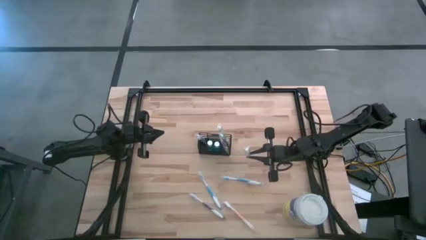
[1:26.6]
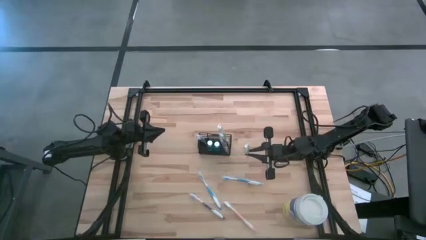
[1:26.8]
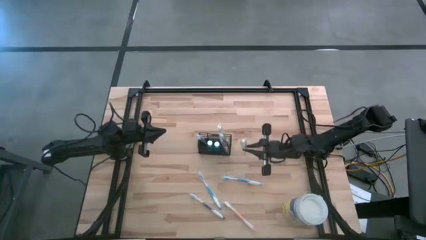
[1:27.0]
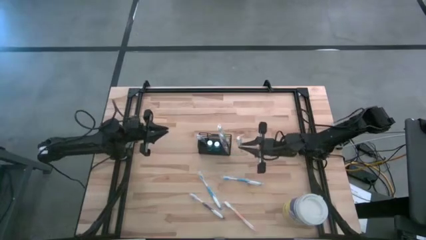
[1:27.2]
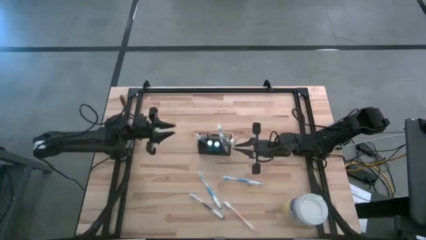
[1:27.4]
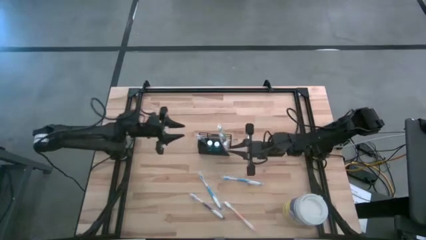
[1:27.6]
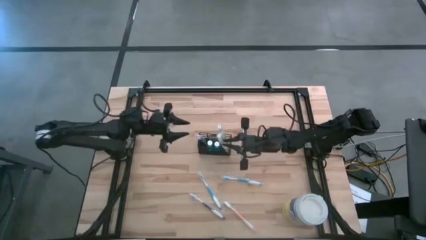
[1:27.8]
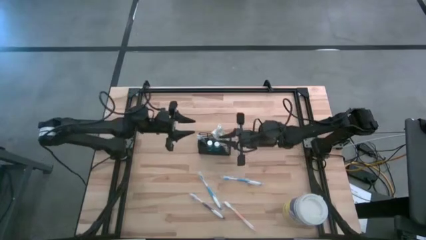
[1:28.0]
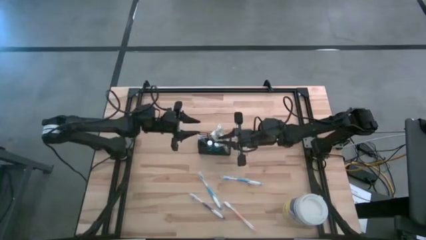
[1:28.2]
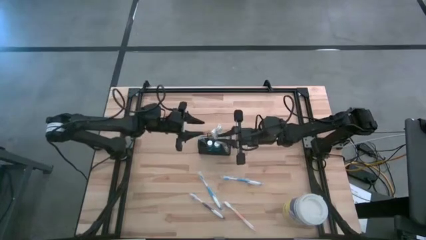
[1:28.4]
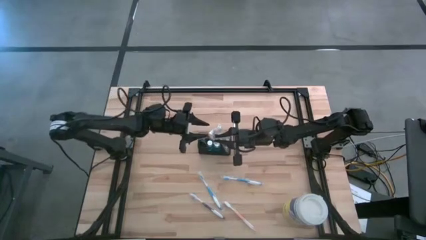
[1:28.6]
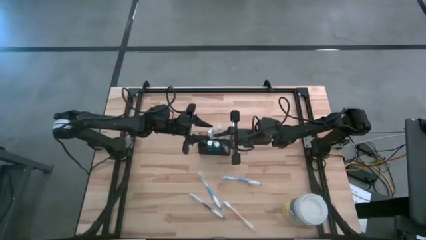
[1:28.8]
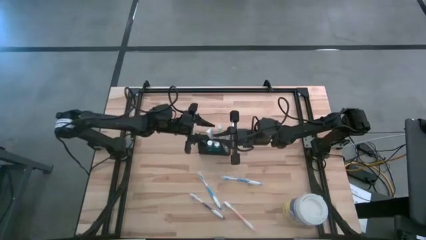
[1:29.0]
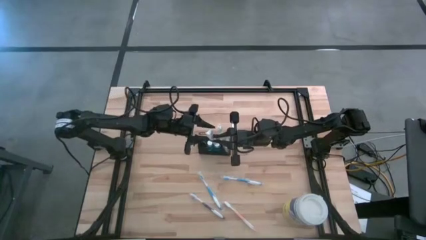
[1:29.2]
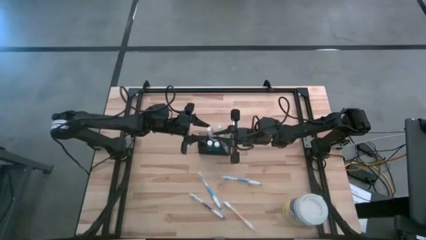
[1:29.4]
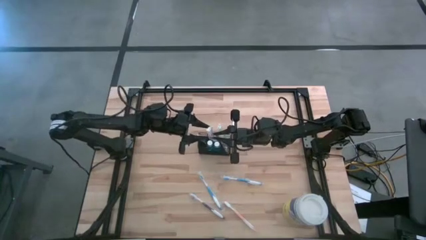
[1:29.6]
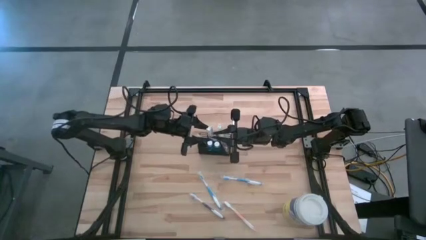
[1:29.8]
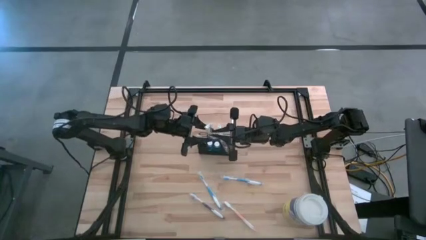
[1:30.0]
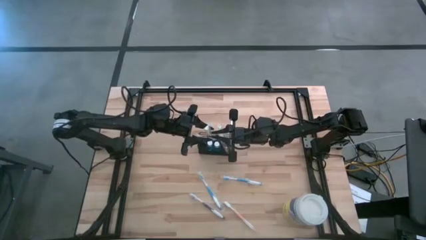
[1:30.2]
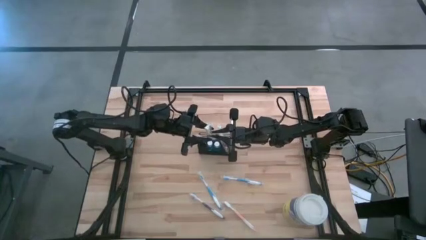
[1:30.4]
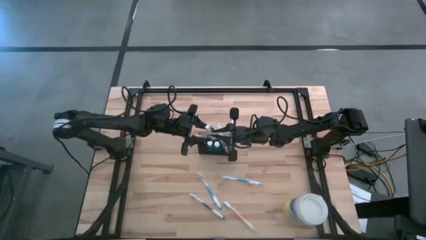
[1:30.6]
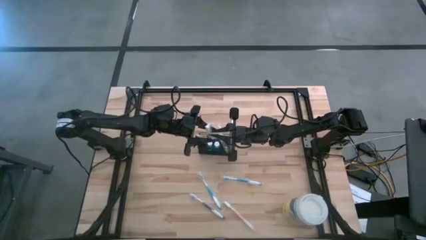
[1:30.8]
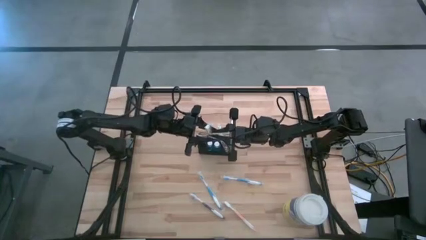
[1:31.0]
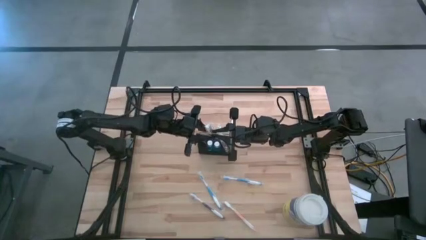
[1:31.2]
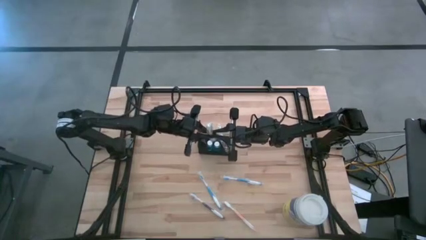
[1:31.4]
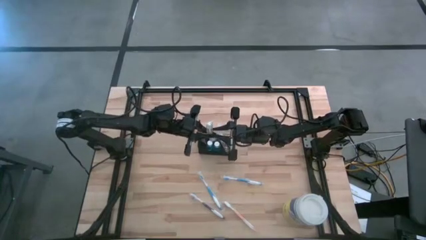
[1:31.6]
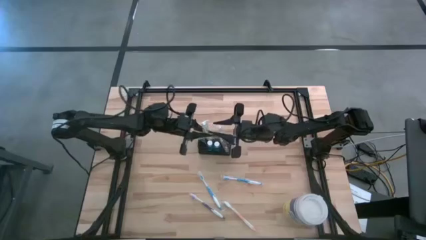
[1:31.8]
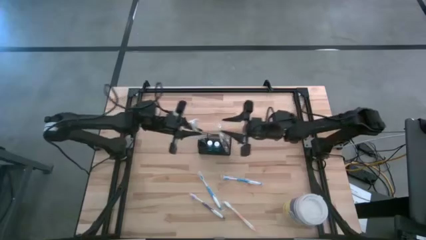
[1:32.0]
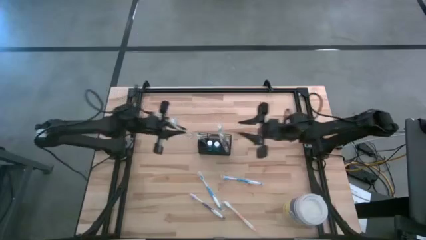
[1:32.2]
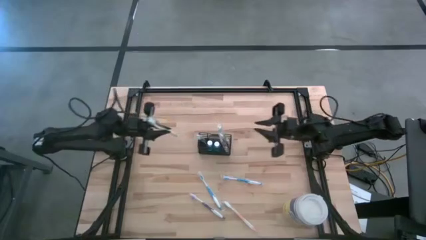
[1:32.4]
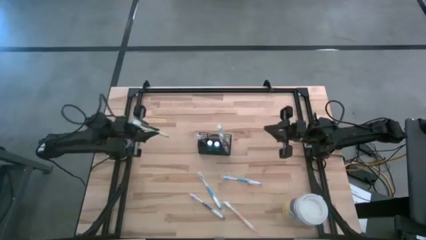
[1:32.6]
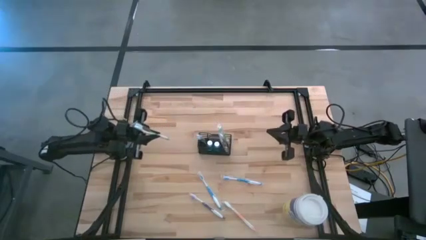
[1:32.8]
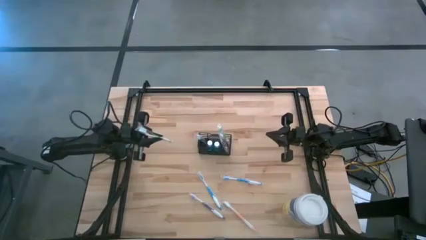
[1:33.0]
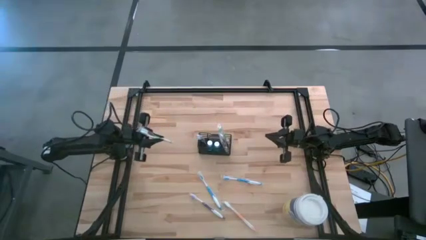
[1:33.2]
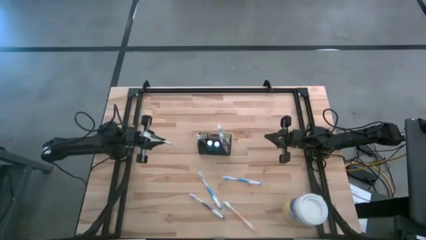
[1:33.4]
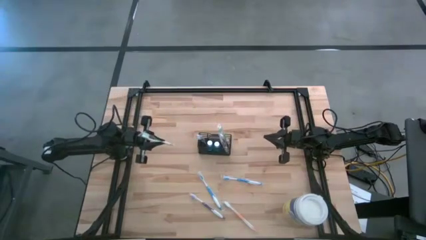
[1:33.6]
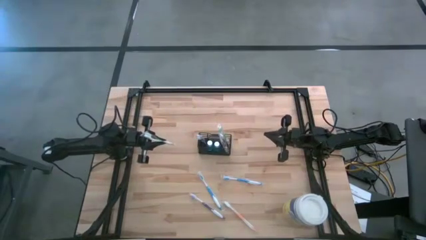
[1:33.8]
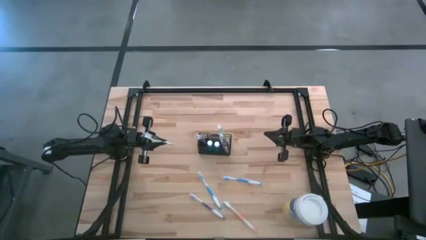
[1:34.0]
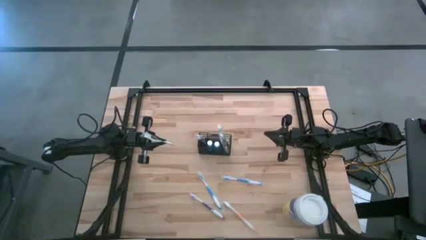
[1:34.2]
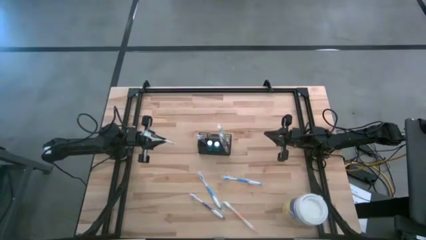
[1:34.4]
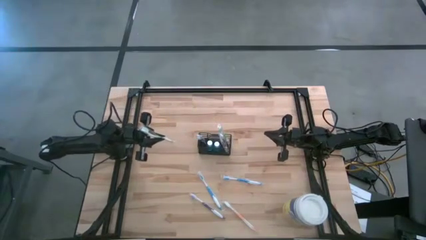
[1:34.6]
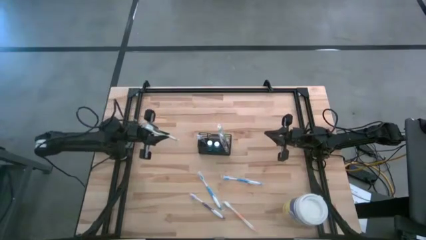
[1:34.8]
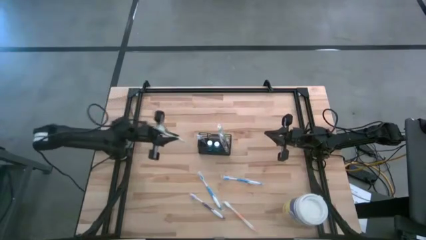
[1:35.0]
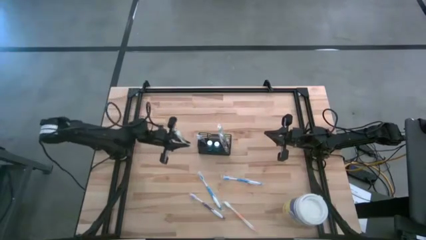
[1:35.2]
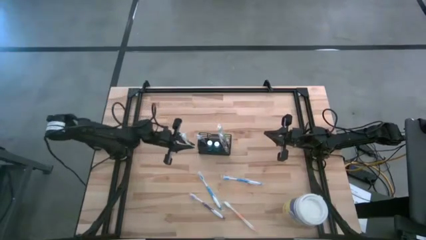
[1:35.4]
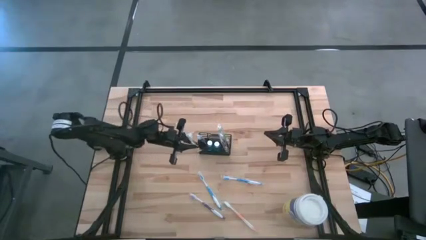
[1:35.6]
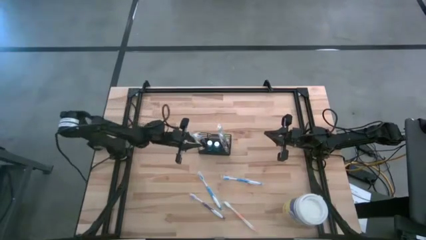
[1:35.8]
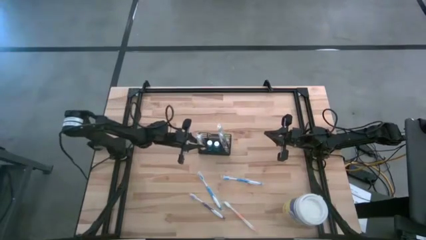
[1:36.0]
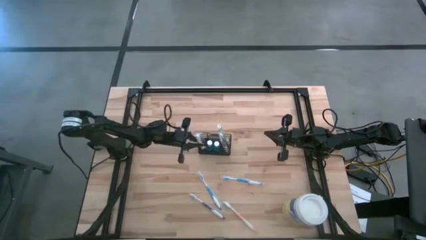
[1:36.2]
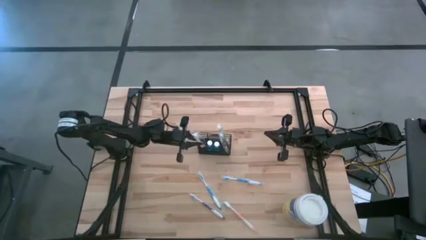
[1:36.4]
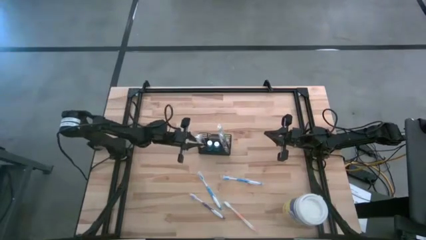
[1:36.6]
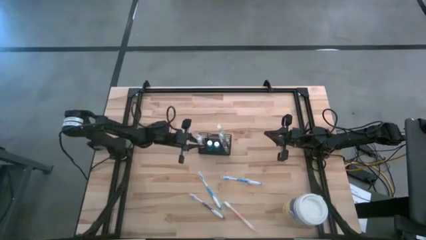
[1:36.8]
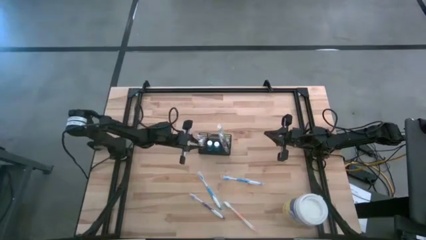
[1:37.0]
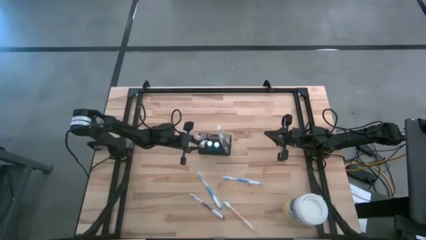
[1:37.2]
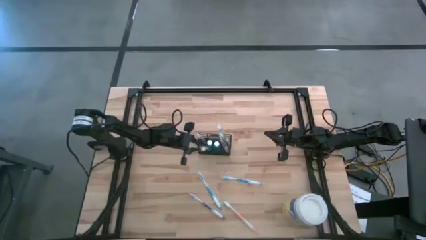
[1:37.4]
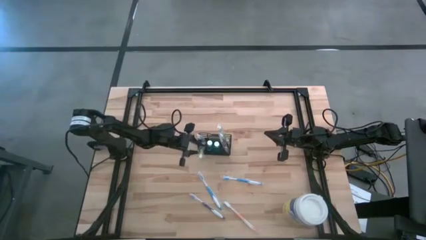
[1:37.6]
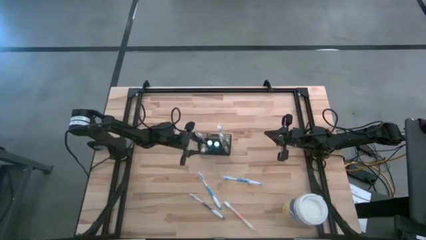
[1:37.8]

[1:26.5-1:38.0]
Task: Pick & Place toothbrushing station
Put the green toothbrush into the black wire organizer
